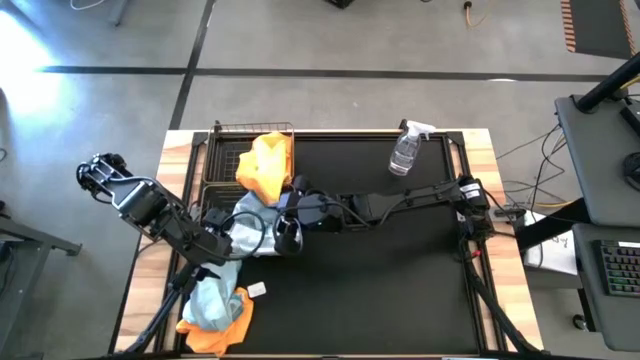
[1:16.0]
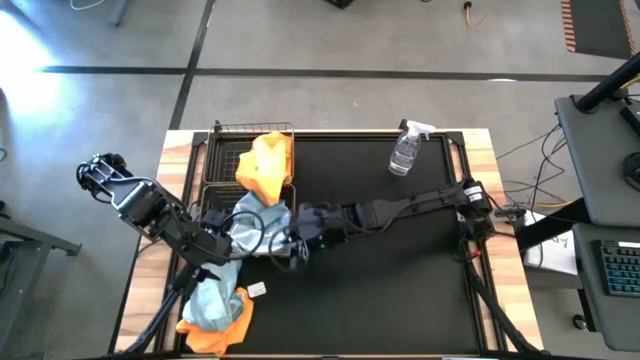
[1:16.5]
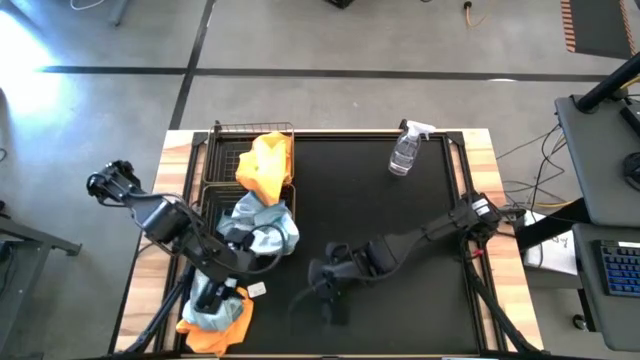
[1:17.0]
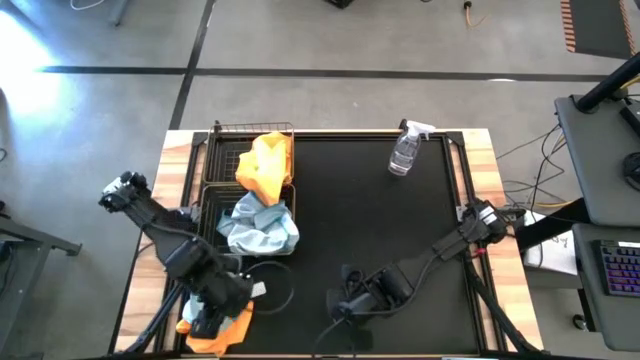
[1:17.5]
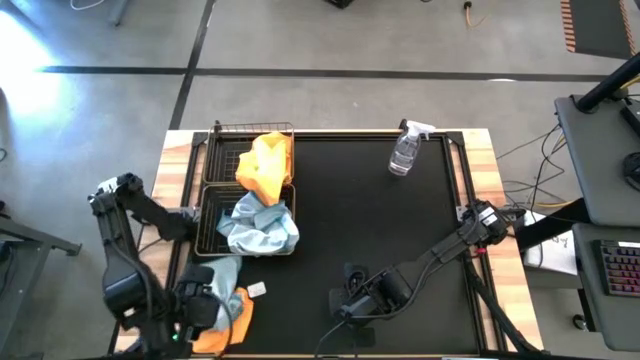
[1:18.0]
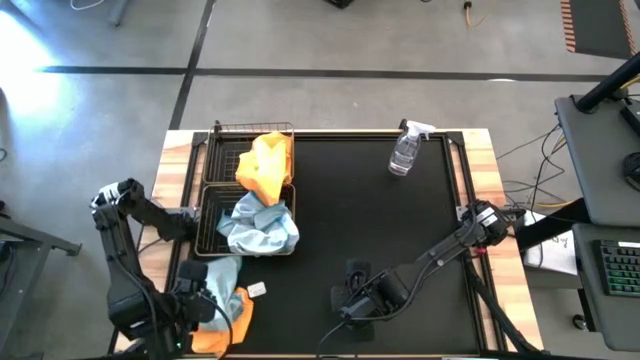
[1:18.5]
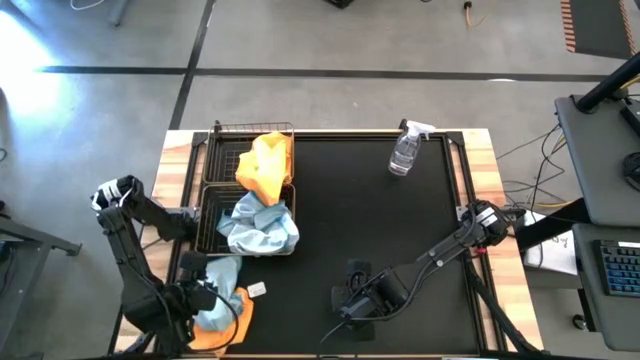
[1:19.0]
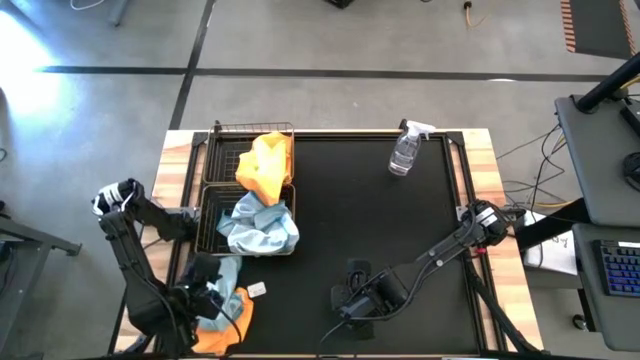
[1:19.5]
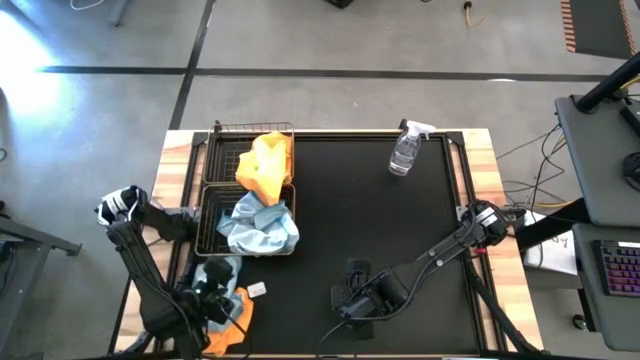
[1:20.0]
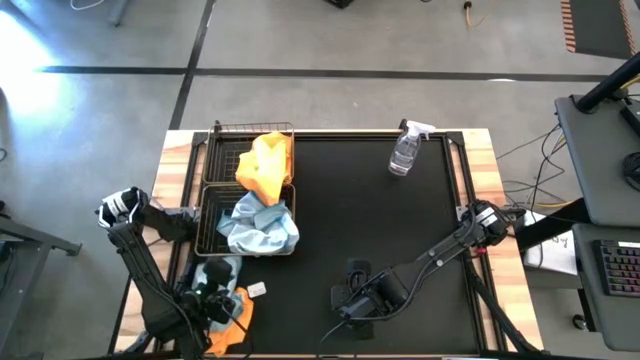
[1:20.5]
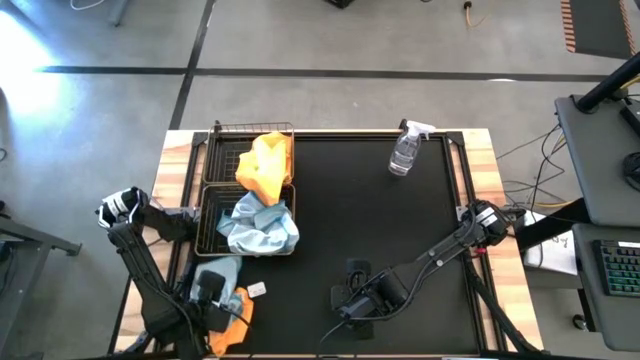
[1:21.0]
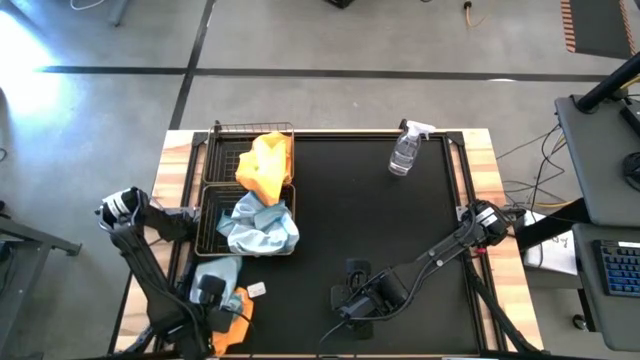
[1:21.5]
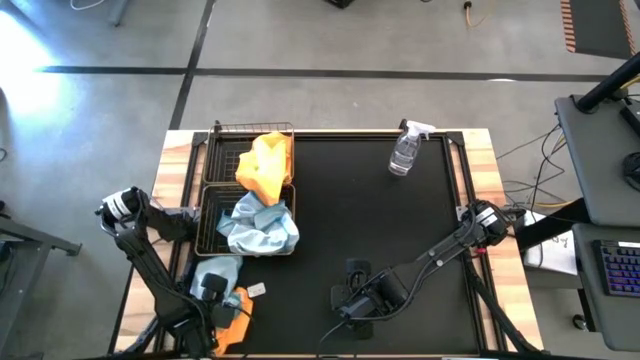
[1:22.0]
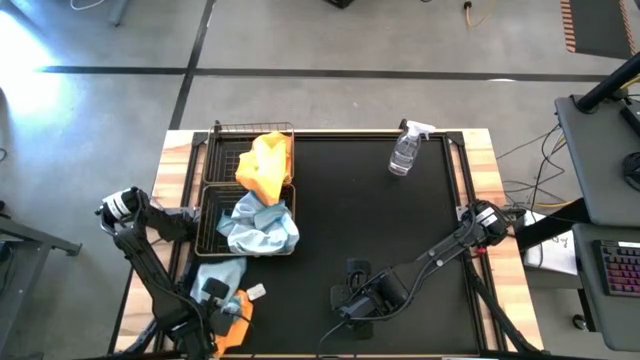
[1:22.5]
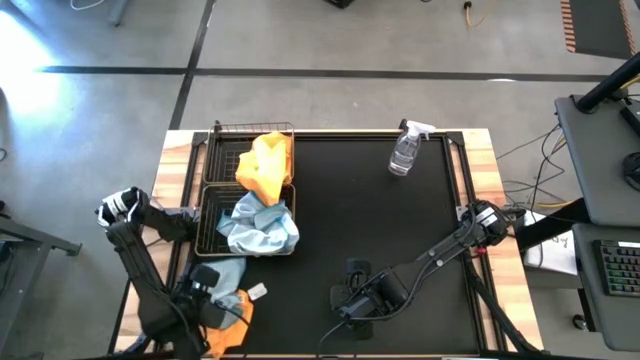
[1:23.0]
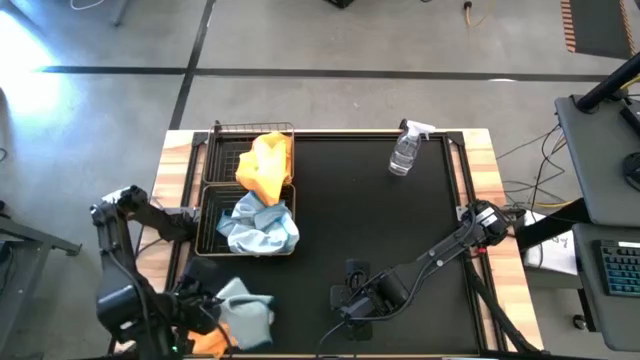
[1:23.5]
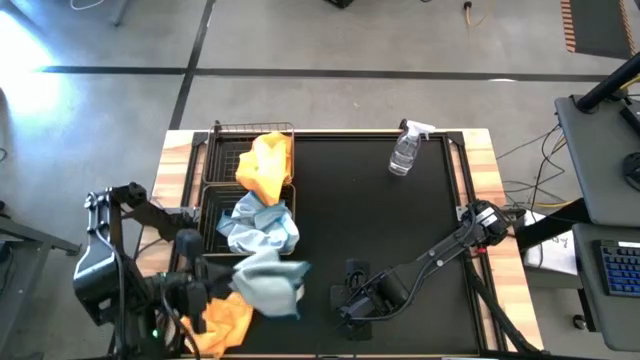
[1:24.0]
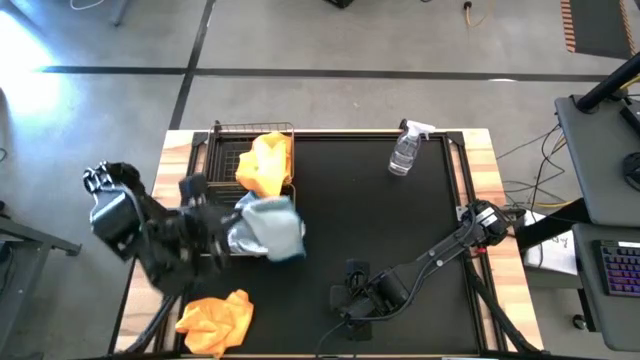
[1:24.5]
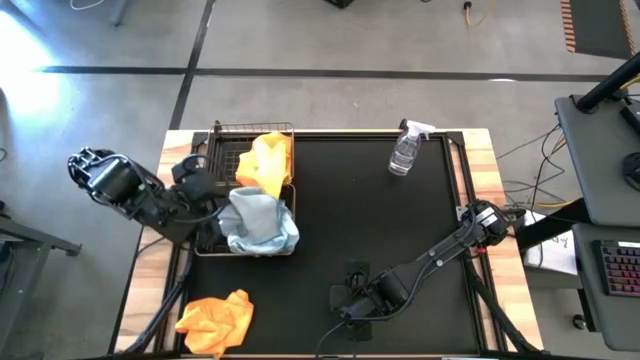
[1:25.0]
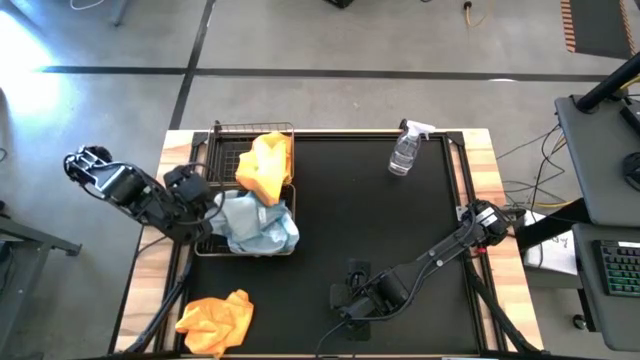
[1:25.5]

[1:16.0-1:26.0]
Task: Sort microfiber towel by color & place in baskets
Put the blue microfiber towel into the bottom wire basket

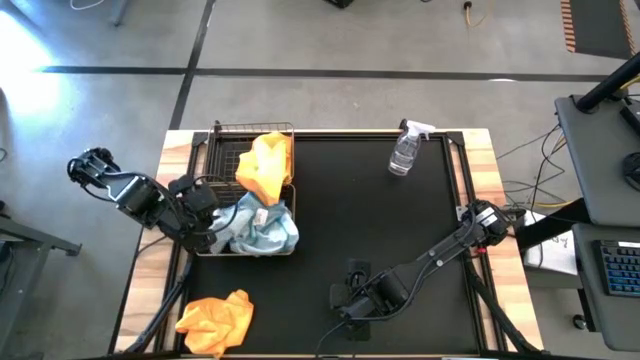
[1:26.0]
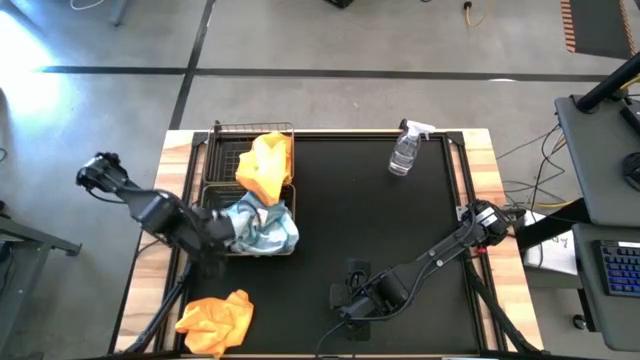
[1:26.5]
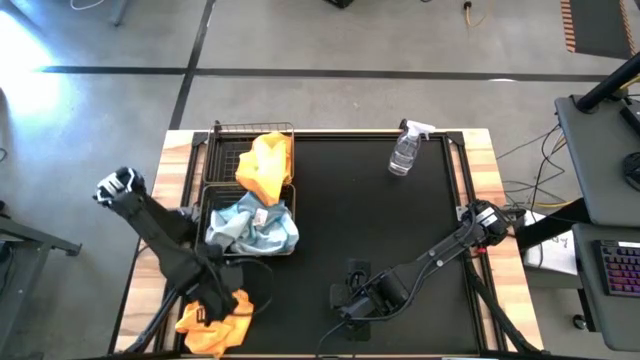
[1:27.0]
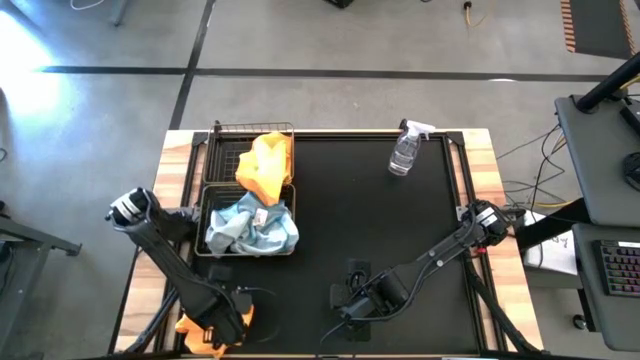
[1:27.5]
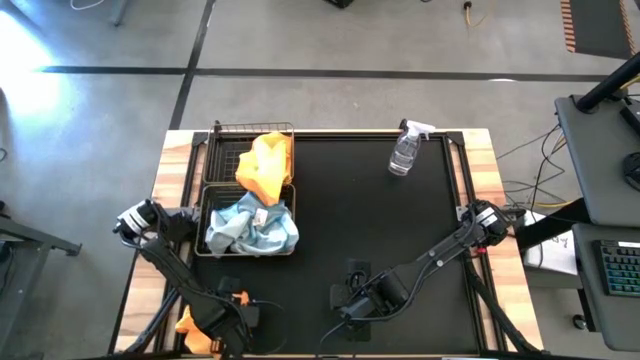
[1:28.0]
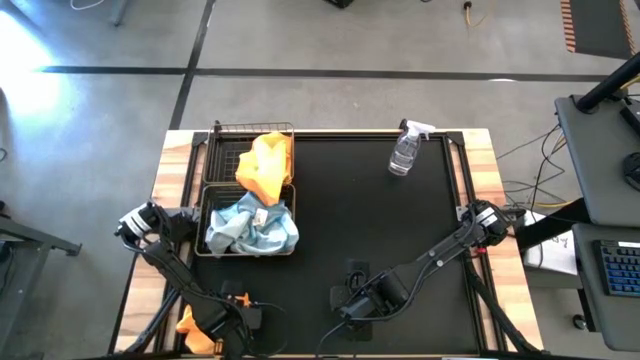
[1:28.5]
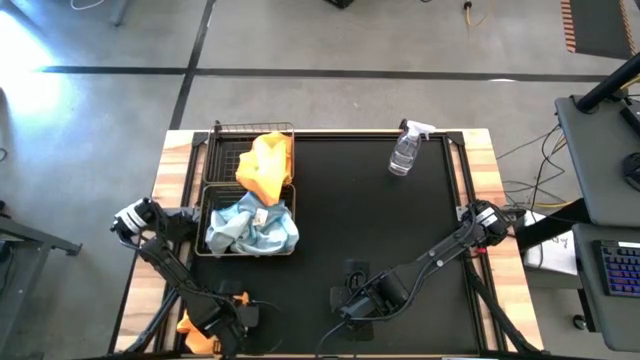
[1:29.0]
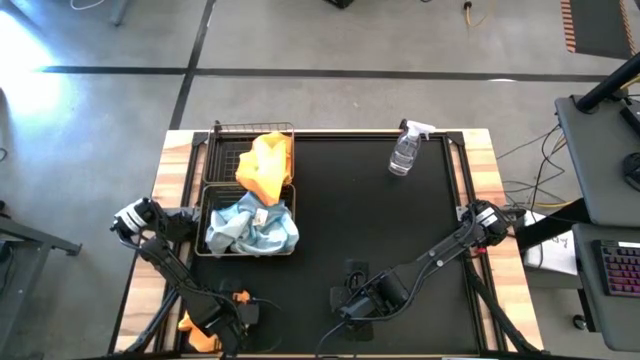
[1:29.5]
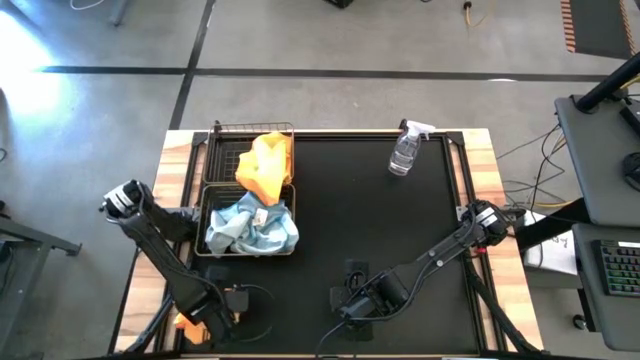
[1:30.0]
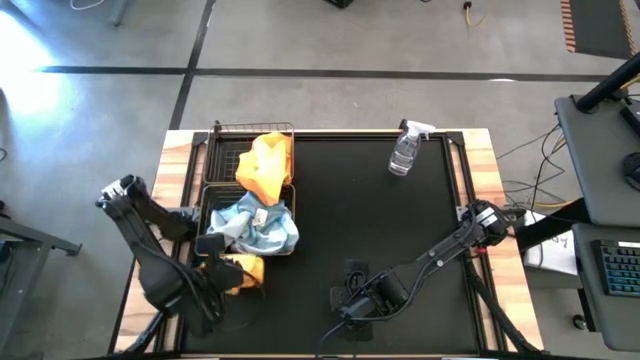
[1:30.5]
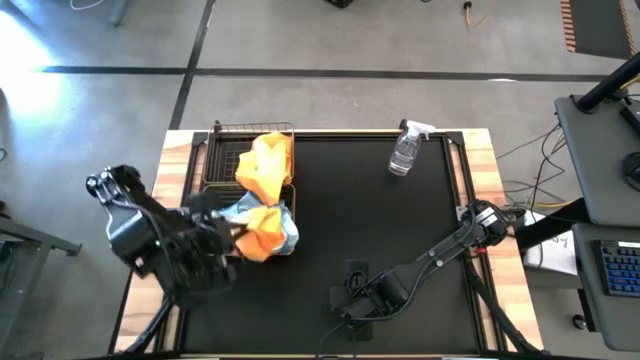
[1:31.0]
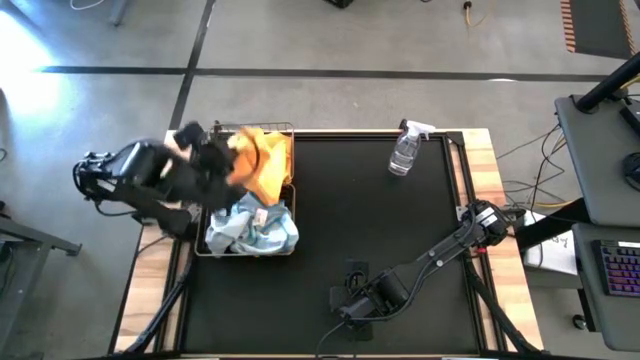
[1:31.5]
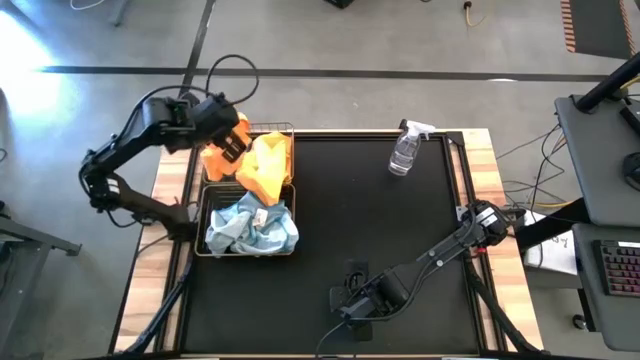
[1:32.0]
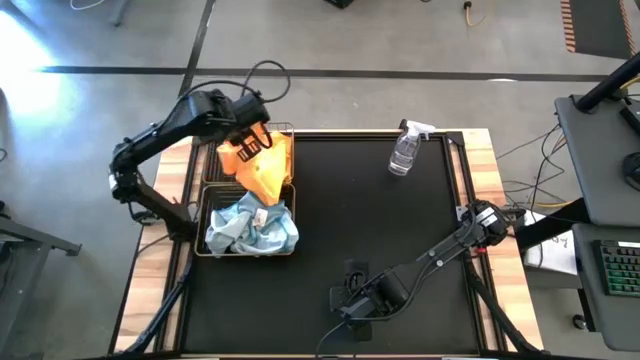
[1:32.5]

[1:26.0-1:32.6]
Put the orange microfiber towel into the top wire basket

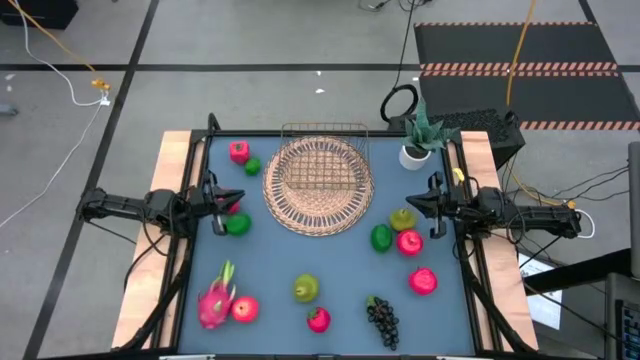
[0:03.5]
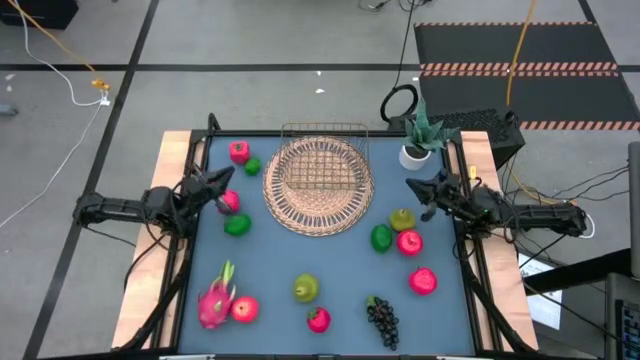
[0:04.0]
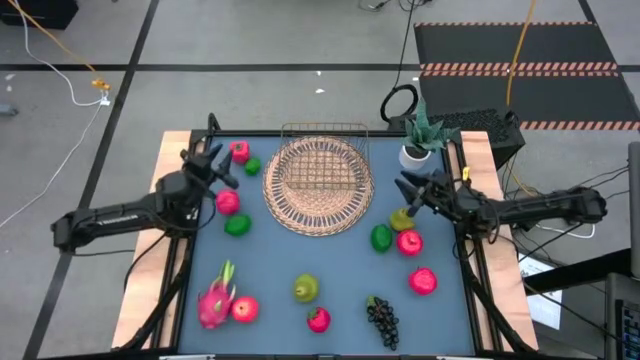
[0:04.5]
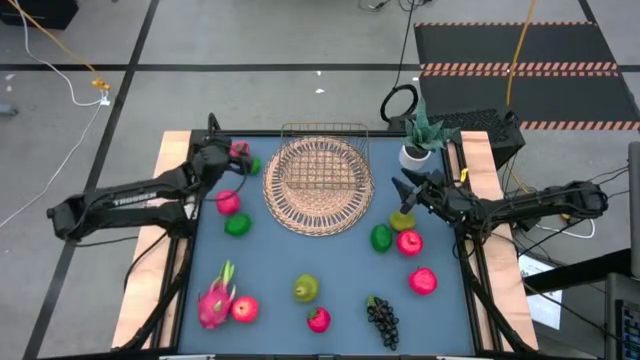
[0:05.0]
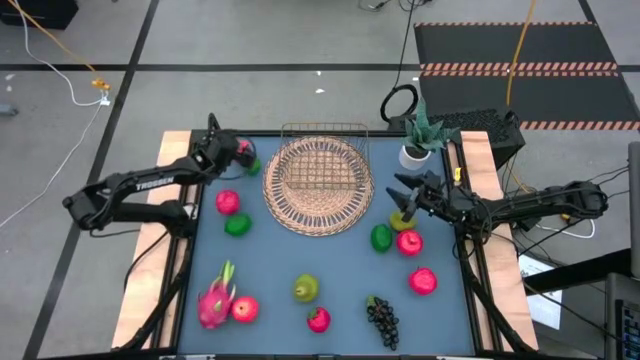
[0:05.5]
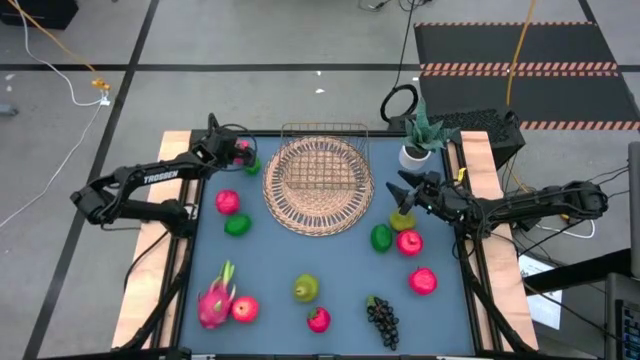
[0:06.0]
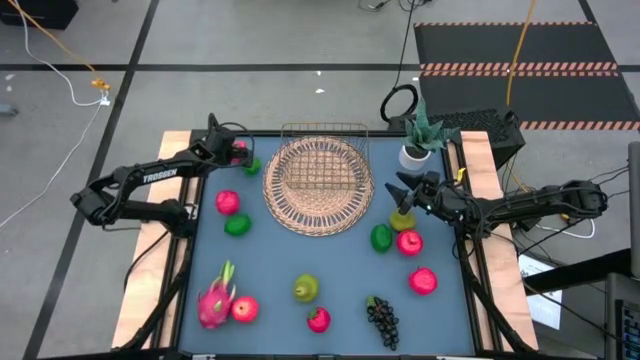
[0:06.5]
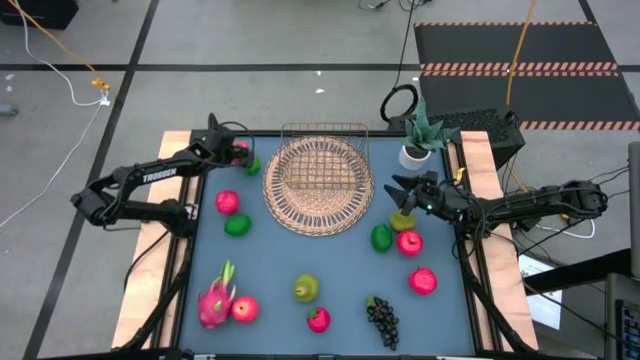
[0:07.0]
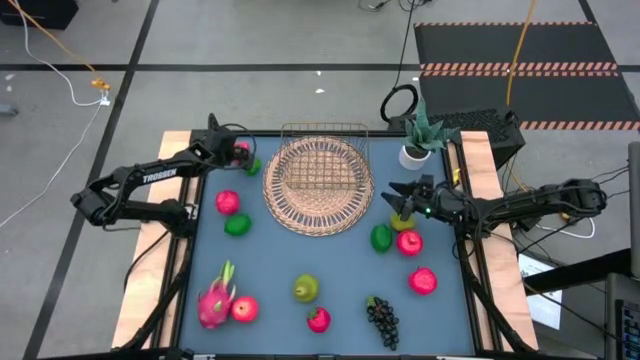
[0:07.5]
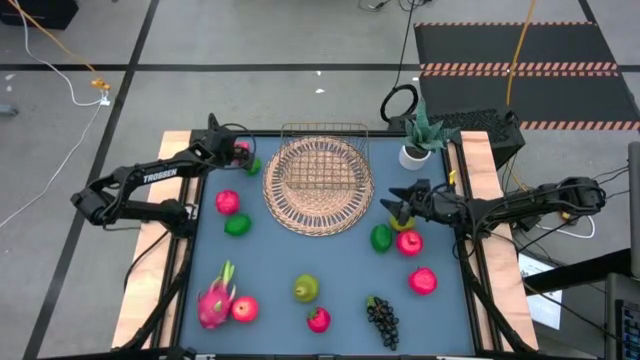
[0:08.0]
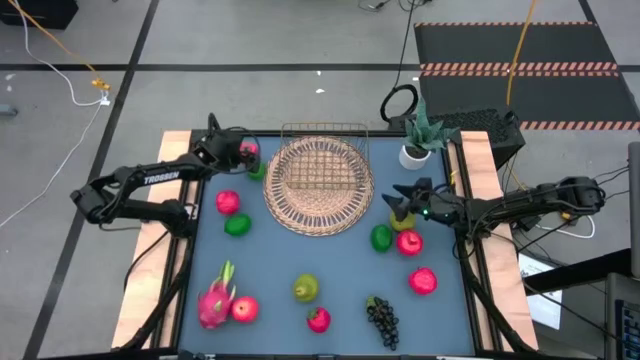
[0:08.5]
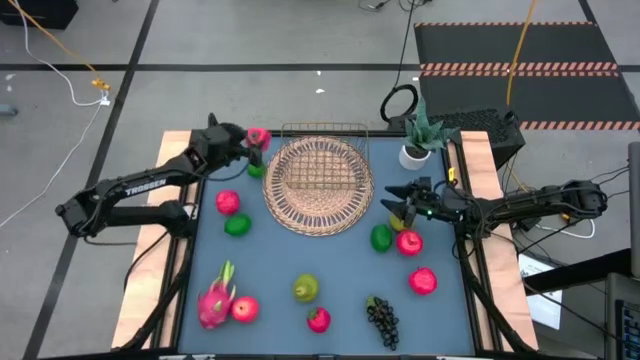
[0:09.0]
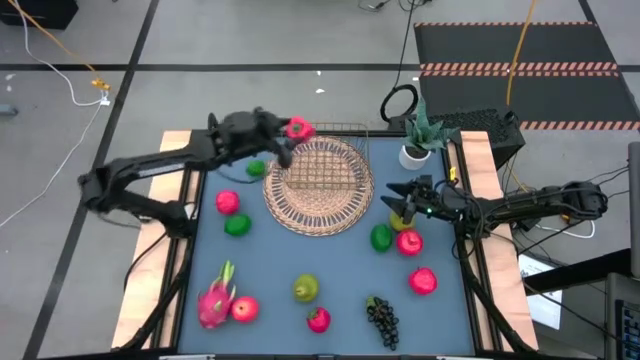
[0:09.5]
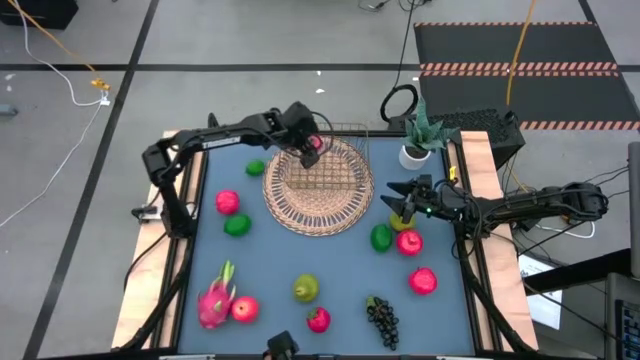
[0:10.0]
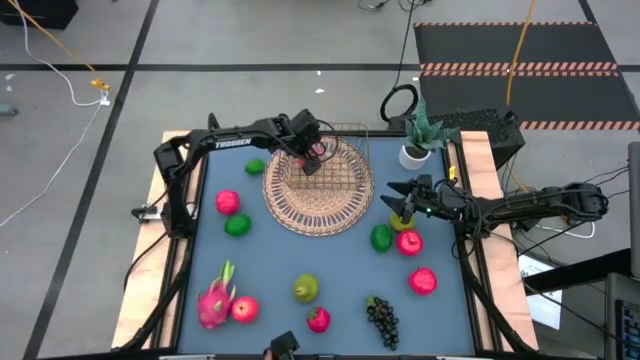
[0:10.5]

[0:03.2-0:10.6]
Task: Build produce basket
Put the red bell pepper into the gold wire basket
